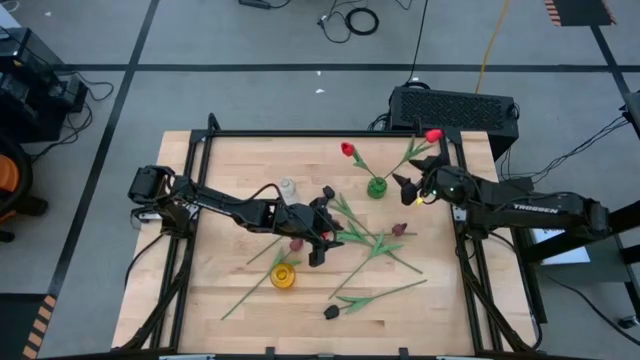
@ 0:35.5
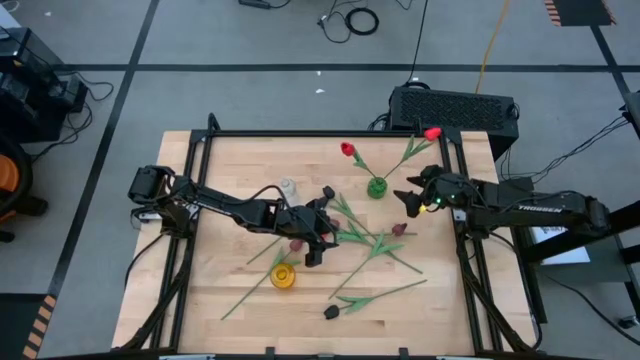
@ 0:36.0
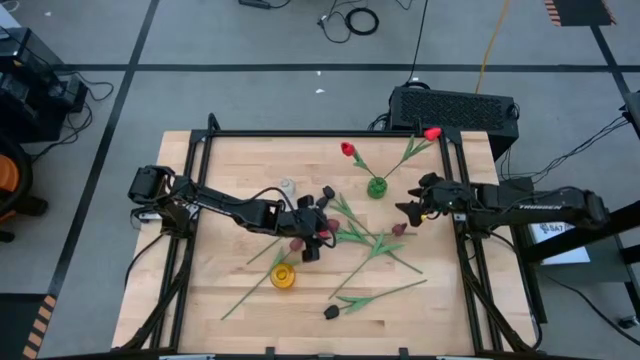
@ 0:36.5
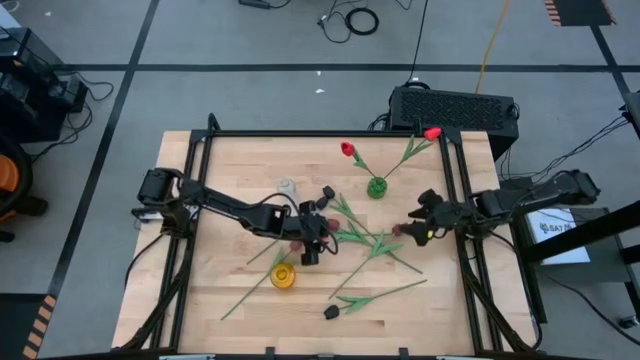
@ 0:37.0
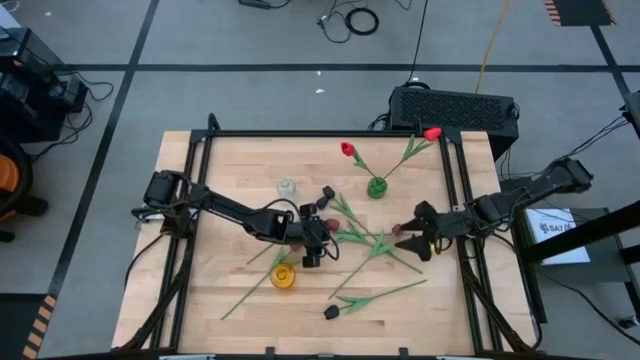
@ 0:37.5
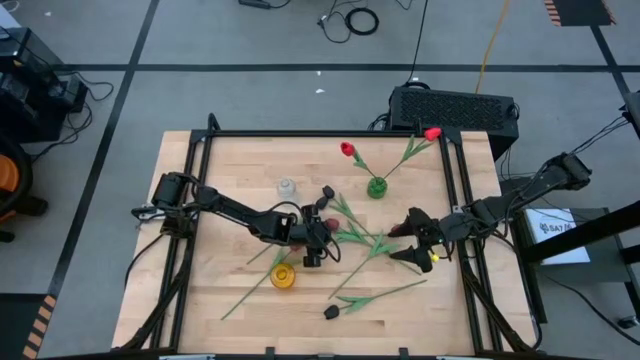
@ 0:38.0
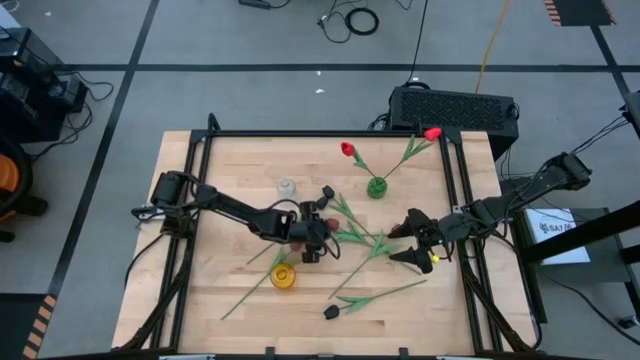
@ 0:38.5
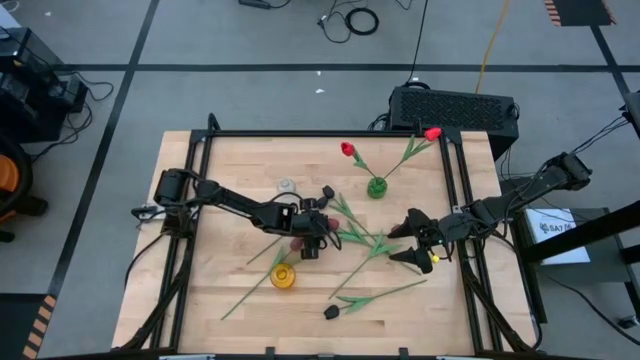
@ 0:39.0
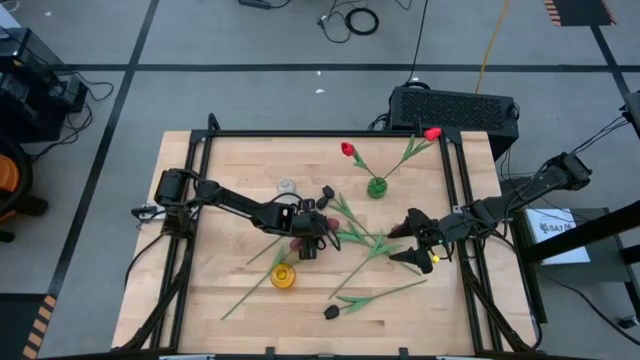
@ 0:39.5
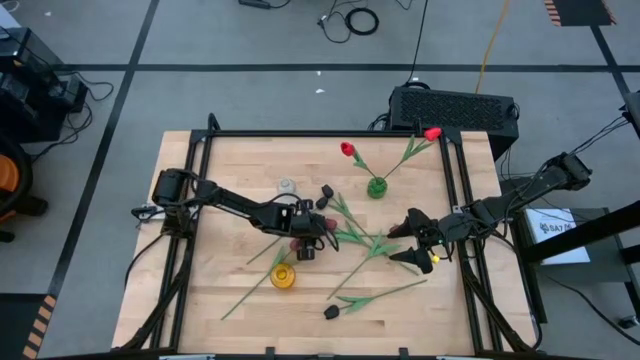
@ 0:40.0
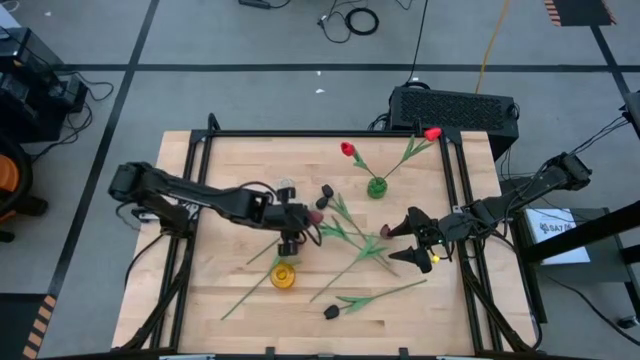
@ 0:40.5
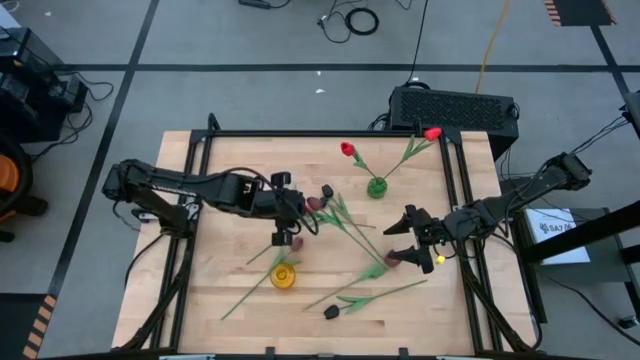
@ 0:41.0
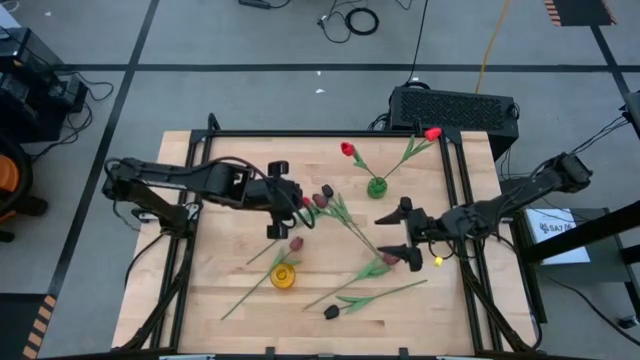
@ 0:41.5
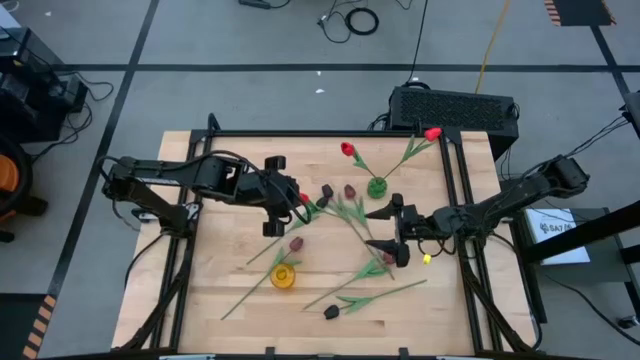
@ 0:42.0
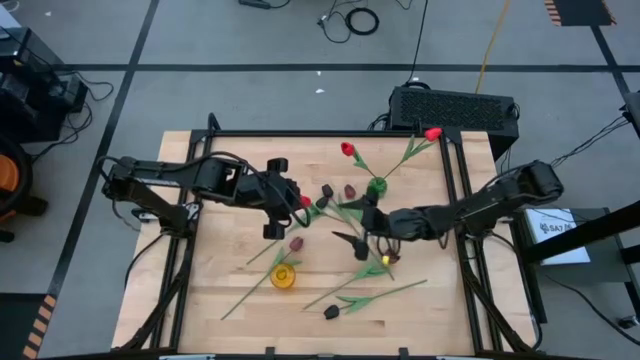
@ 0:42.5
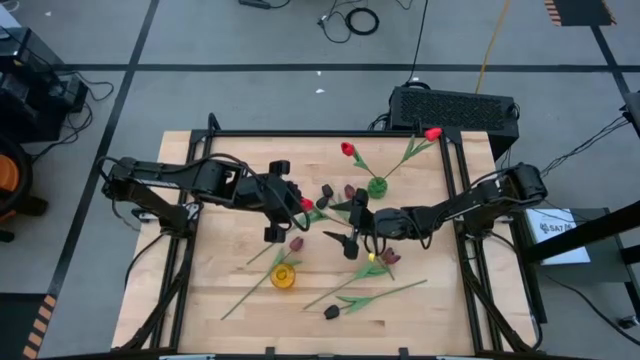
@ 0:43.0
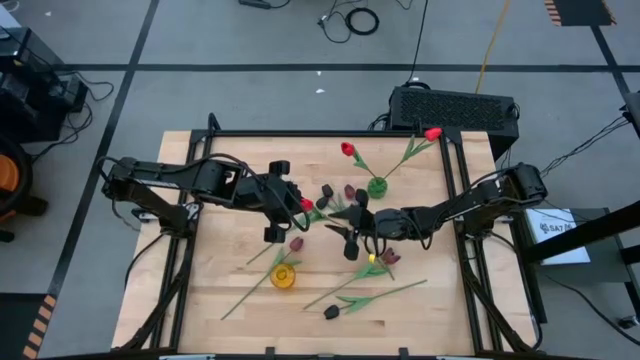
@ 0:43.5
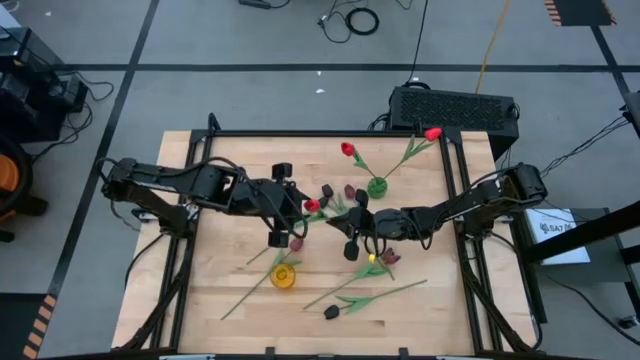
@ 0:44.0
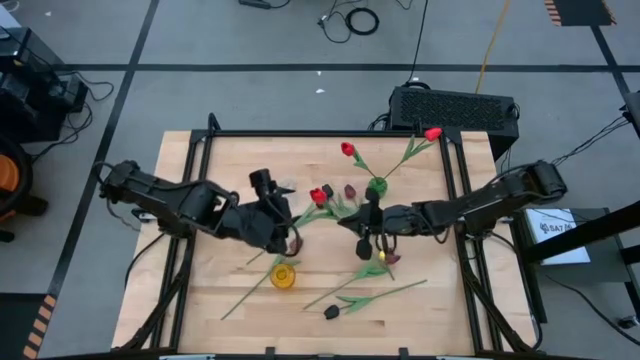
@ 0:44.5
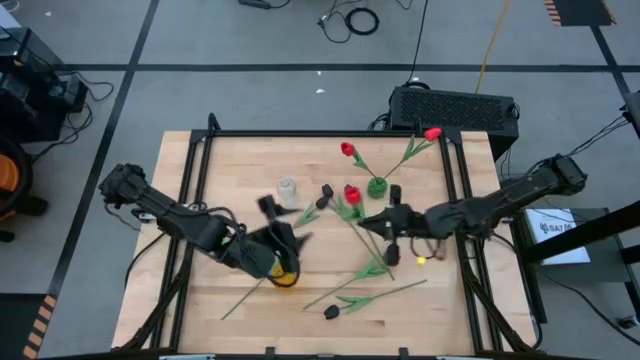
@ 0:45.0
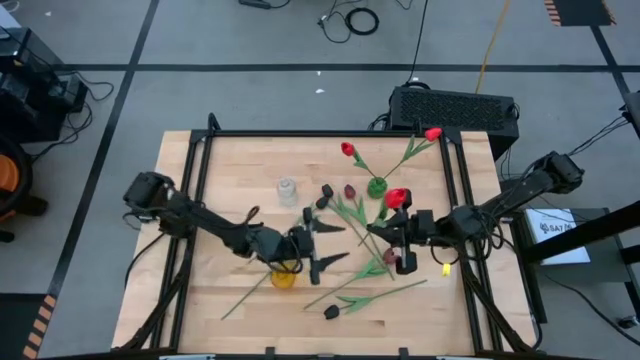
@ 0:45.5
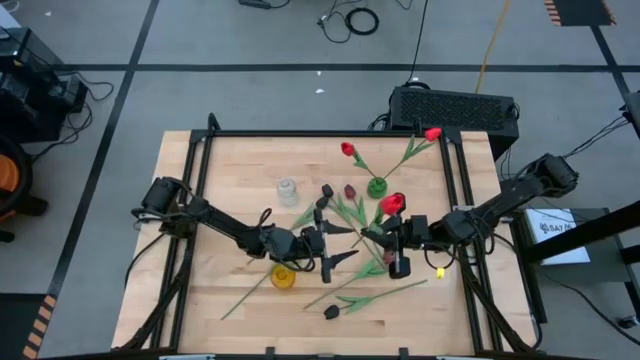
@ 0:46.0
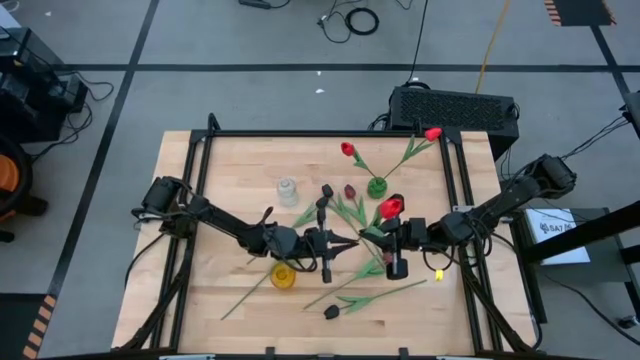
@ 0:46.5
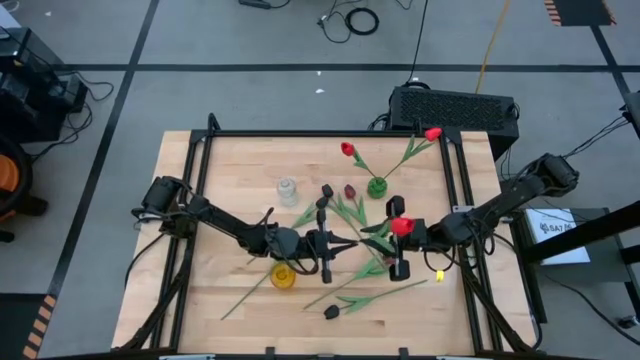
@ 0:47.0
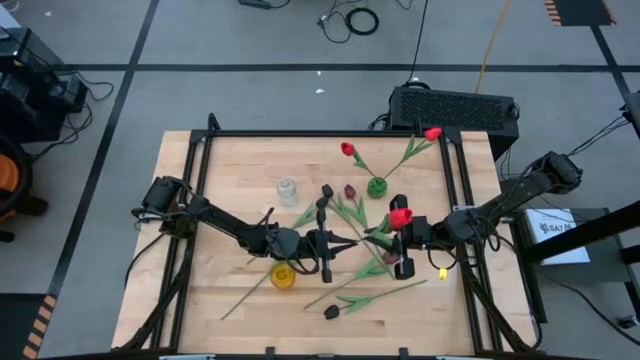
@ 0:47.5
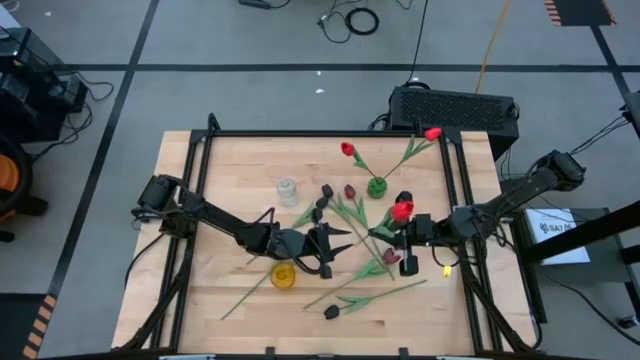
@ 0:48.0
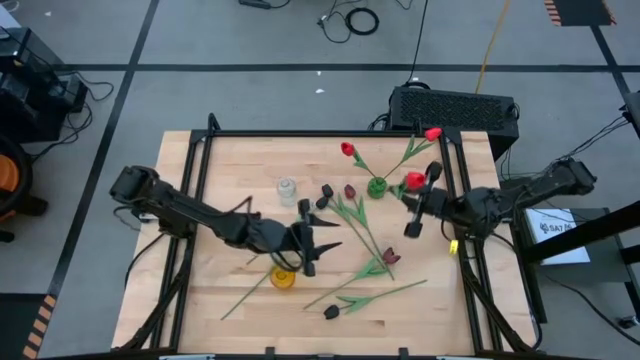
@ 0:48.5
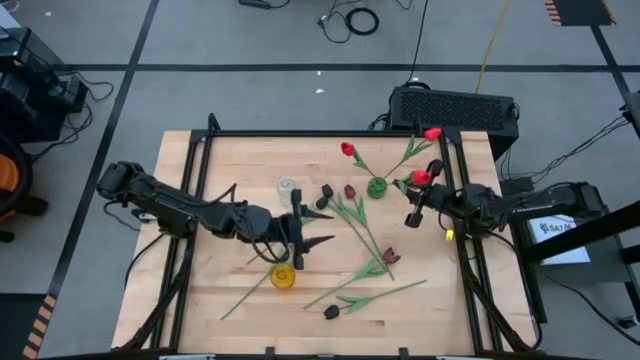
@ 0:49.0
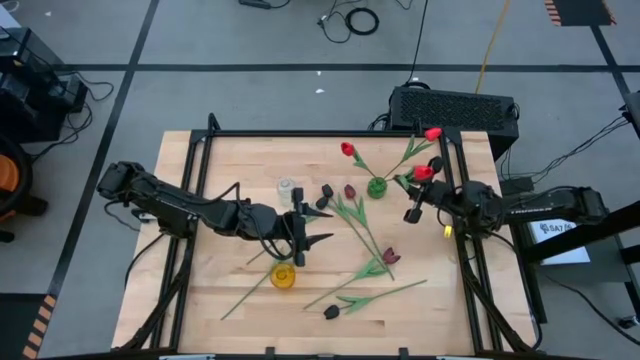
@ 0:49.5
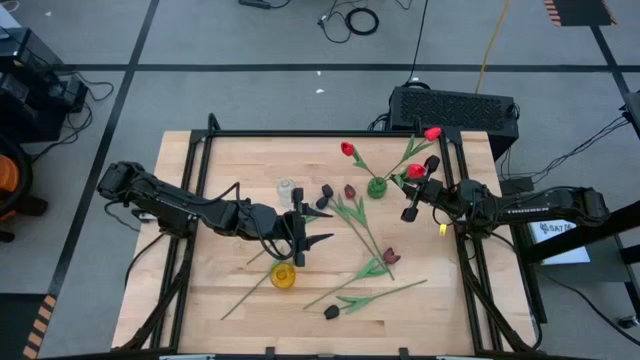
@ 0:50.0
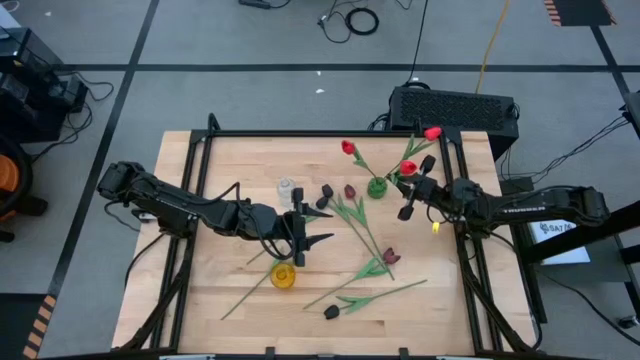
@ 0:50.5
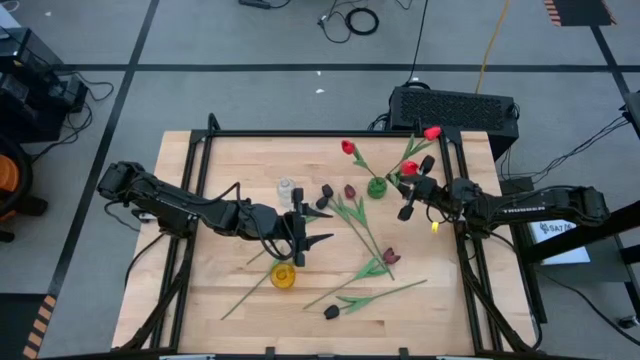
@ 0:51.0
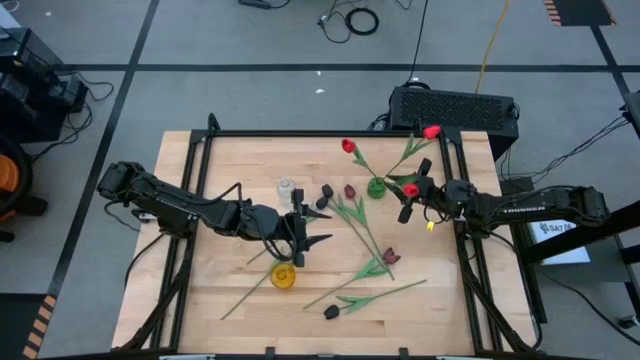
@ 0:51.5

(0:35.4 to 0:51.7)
Task: Sort flowers into vase by color
Put the red tulip into the green vase

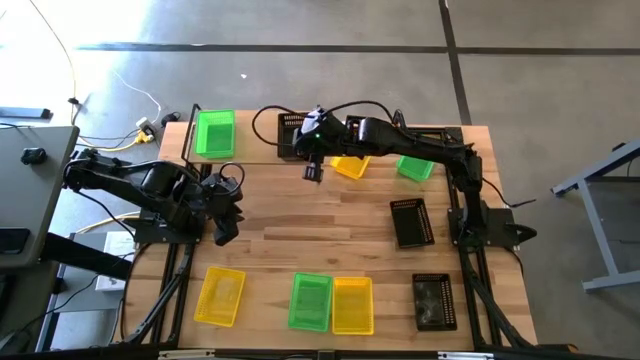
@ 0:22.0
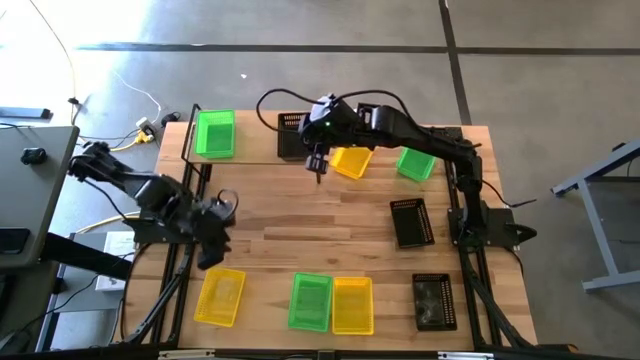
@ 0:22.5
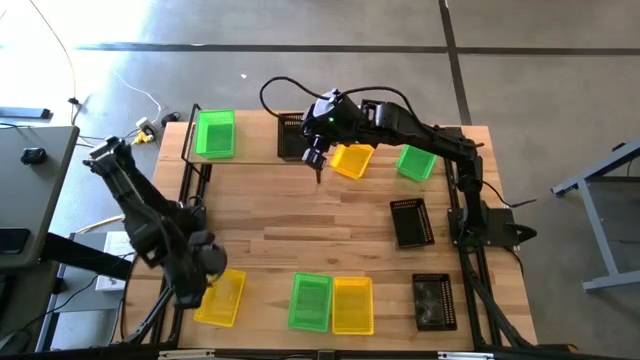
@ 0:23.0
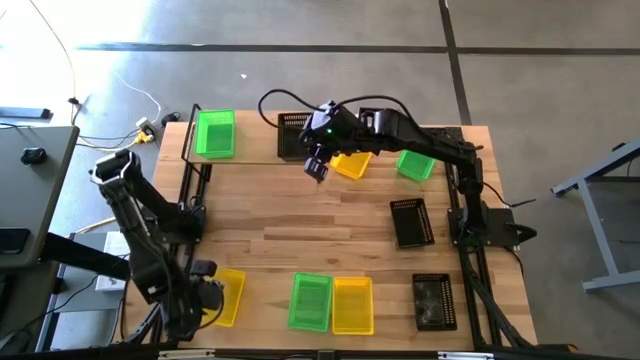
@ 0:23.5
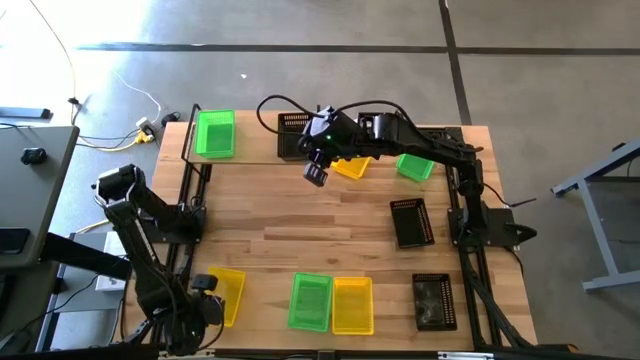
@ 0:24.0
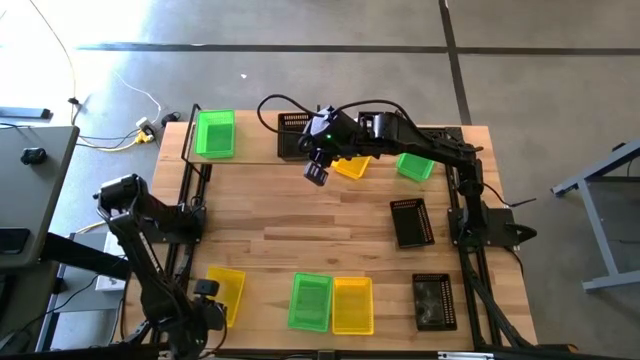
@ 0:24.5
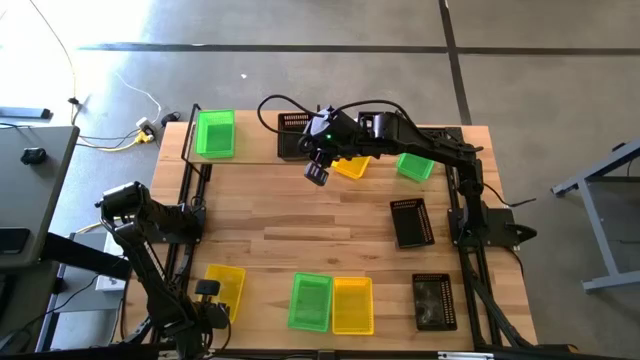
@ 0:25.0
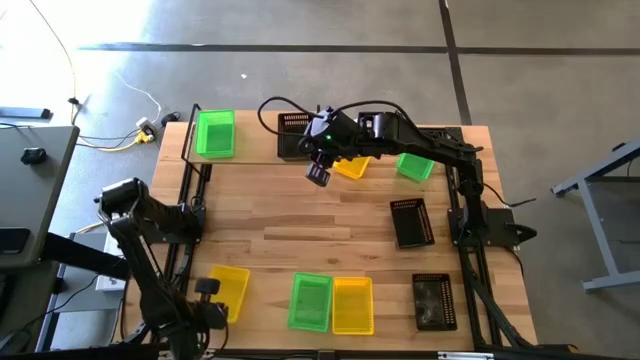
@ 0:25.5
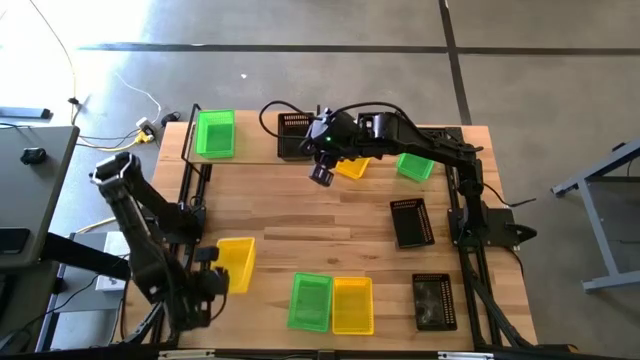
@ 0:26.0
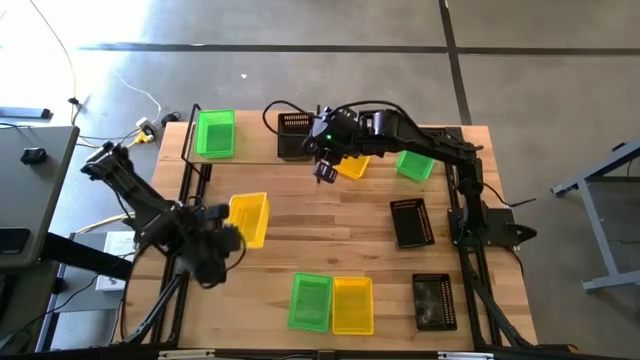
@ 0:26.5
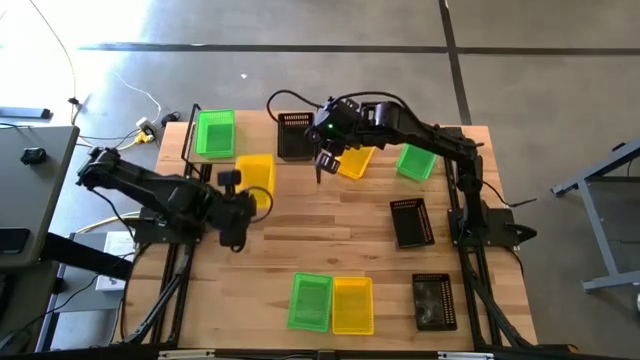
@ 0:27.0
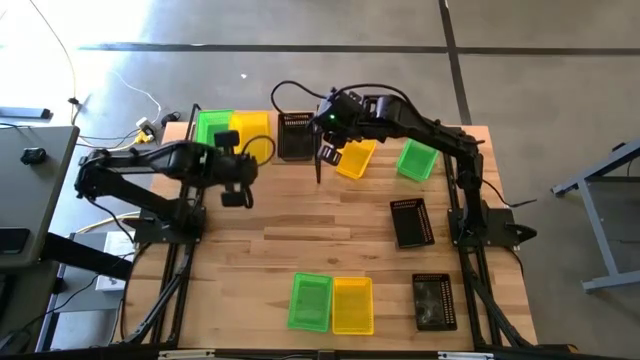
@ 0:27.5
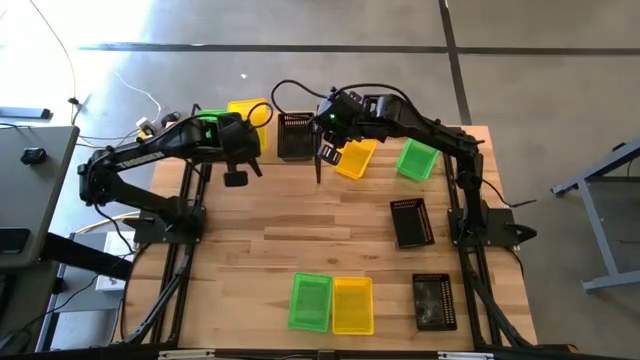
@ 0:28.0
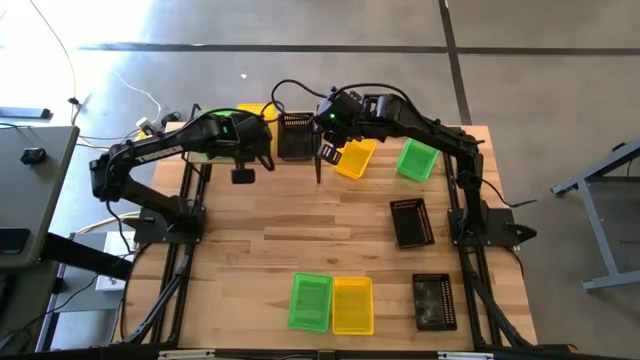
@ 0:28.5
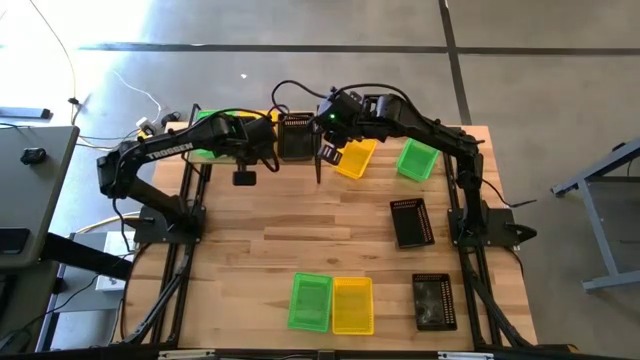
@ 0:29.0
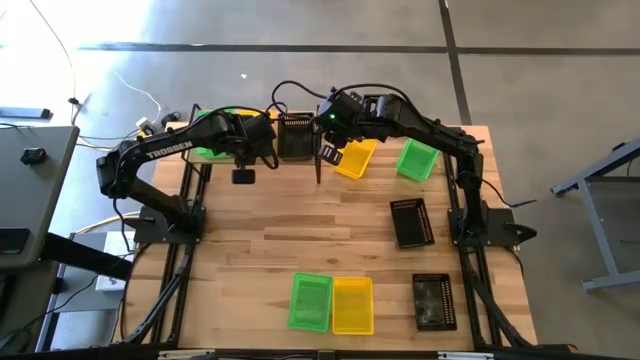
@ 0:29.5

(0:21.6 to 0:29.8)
Task: Stack baskets on shelf by color
Put the bottom left yellow bin on the shelf
